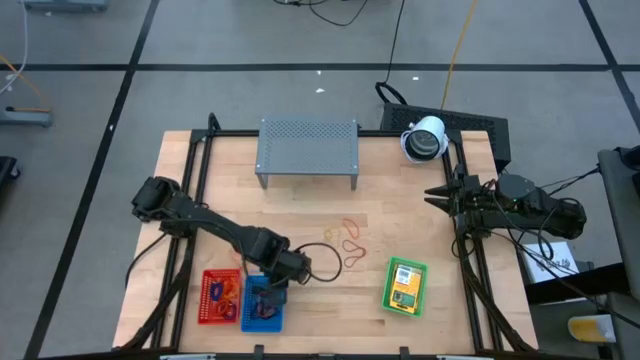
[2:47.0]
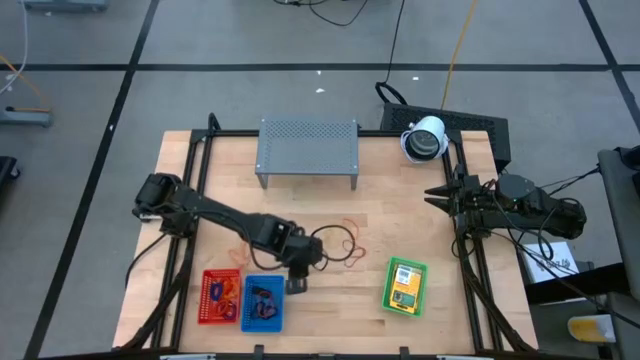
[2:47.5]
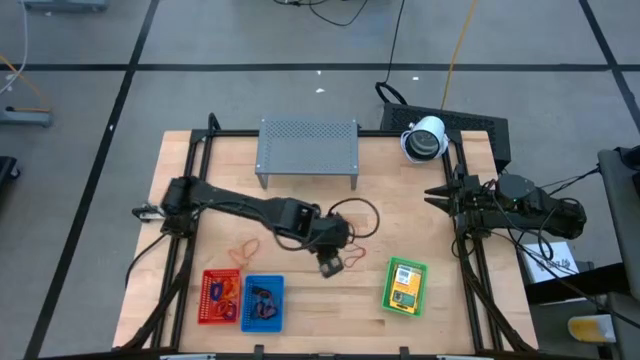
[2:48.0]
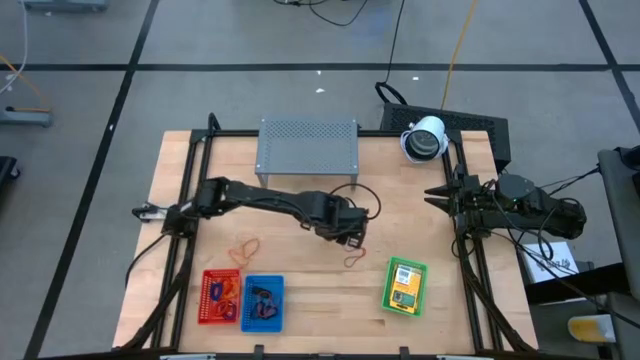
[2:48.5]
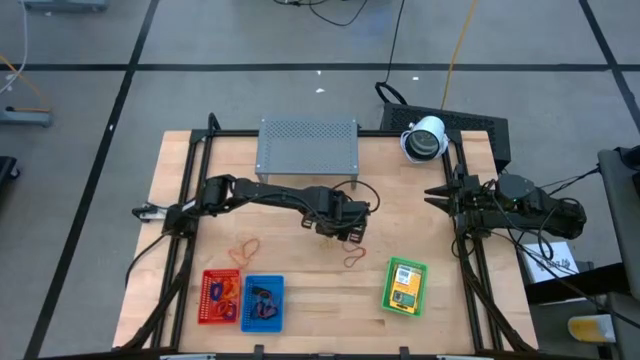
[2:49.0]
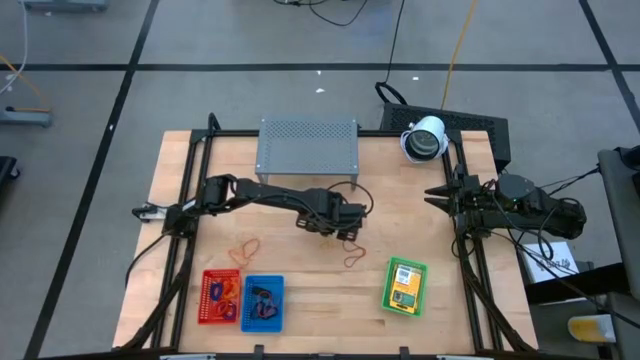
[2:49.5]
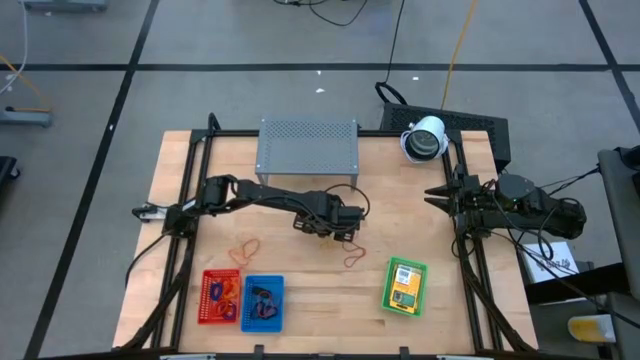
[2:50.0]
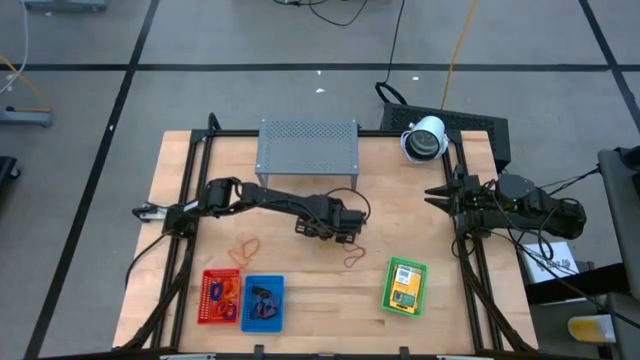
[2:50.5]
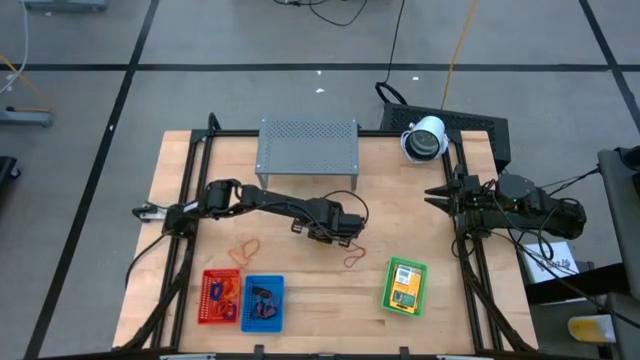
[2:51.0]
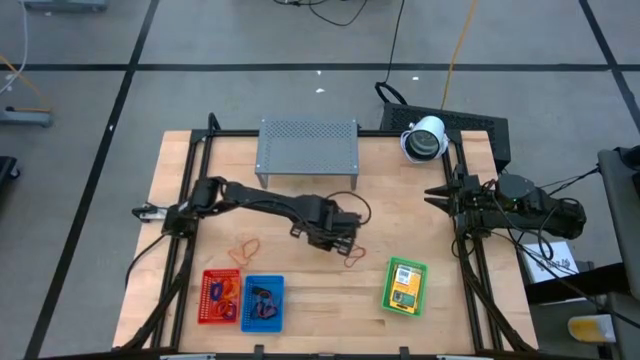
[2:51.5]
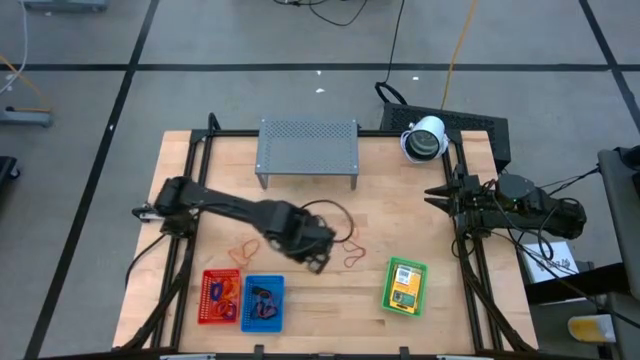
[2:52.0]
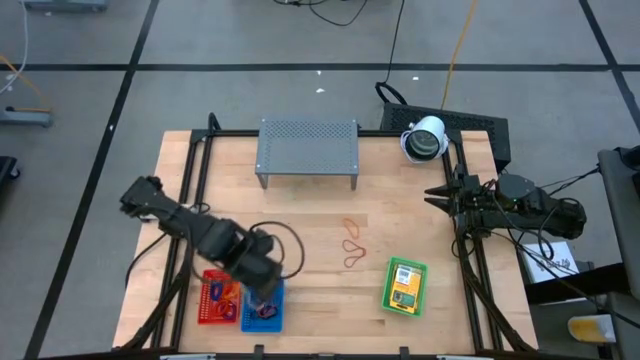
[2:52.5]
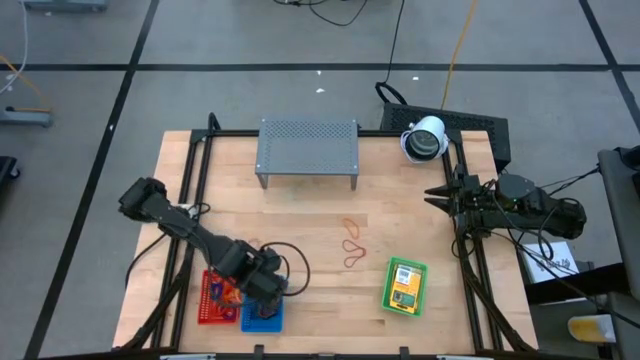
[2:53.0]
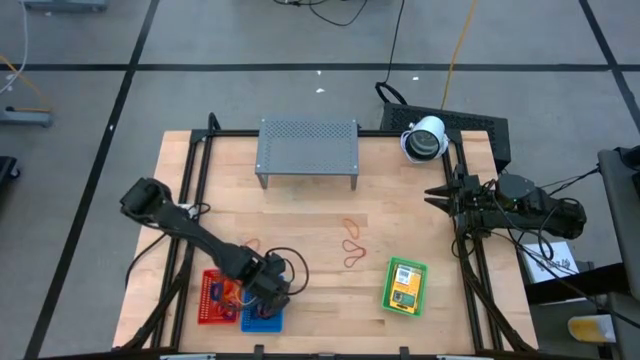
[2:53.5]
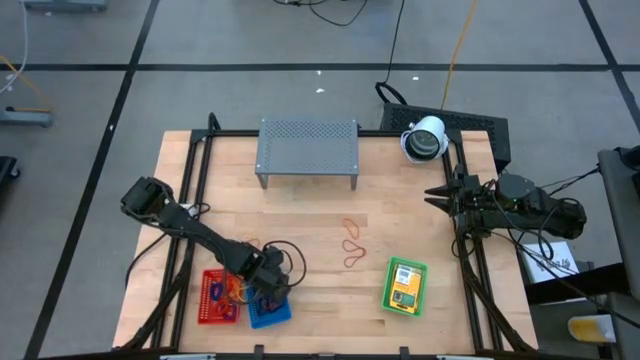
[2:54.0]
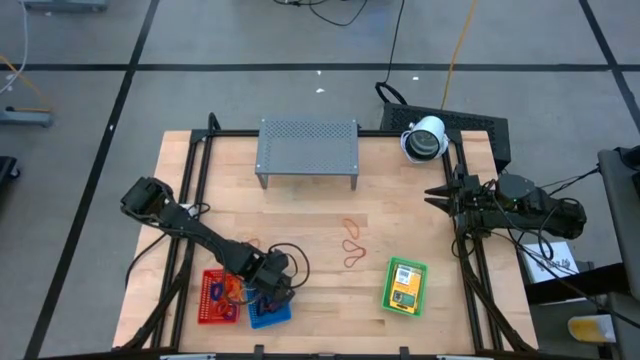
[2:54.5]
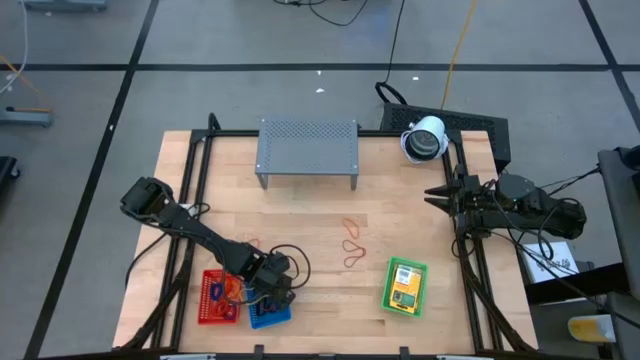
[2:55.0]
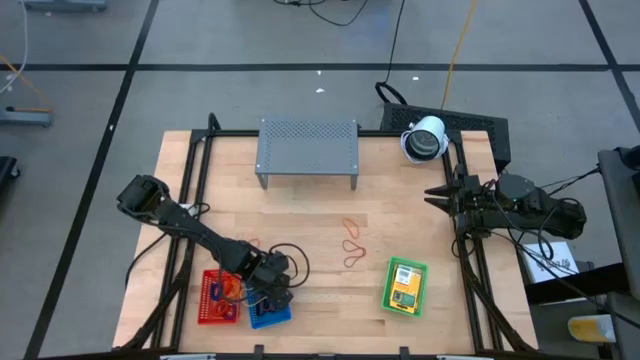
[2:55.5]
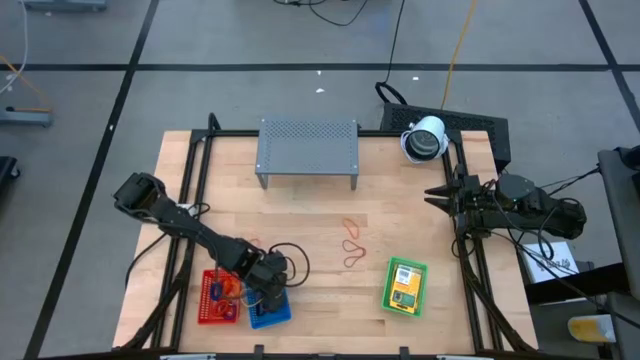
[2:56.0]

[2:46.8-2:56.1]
Task: Pick & Place Office Desk Supplies
Put the yellow rubber band into the blue bin

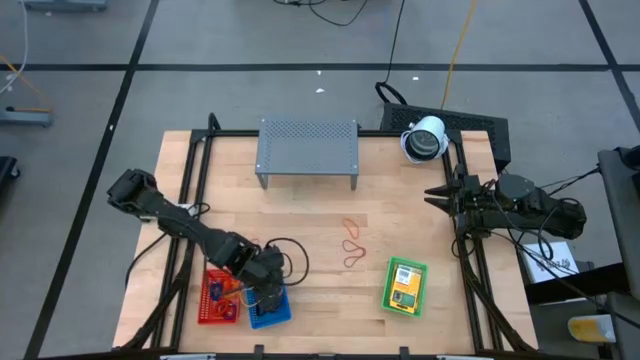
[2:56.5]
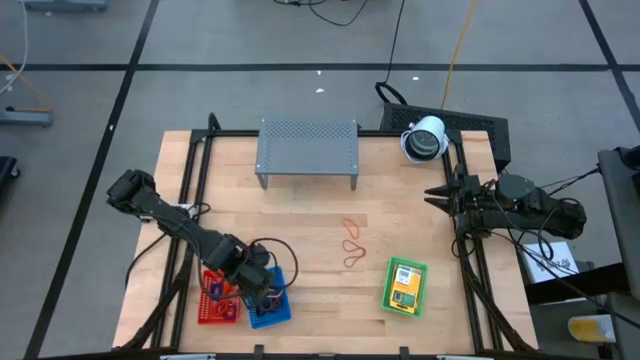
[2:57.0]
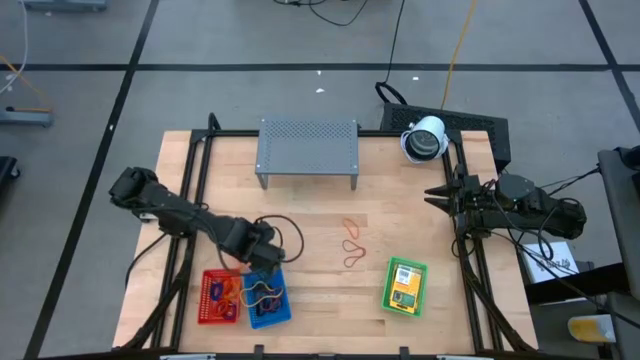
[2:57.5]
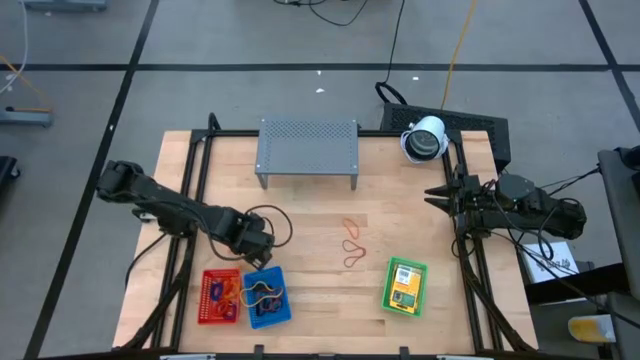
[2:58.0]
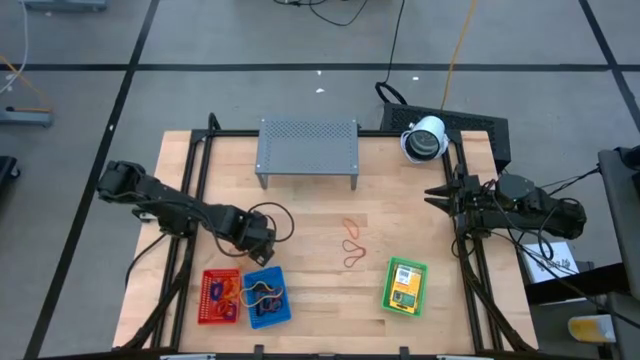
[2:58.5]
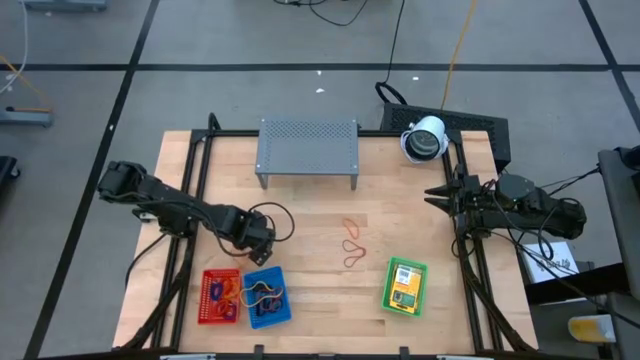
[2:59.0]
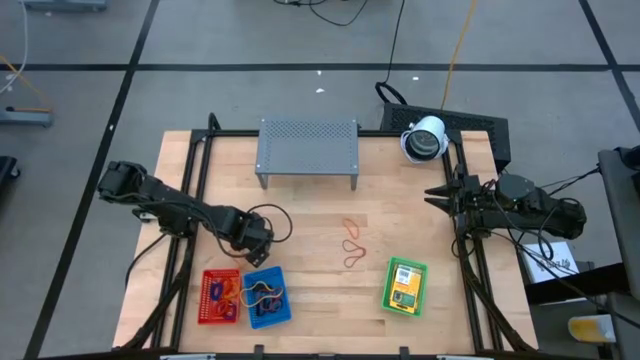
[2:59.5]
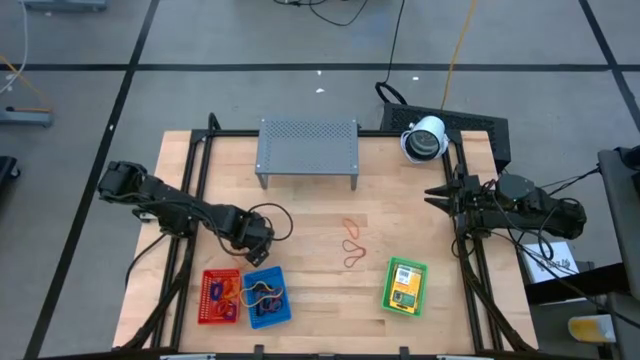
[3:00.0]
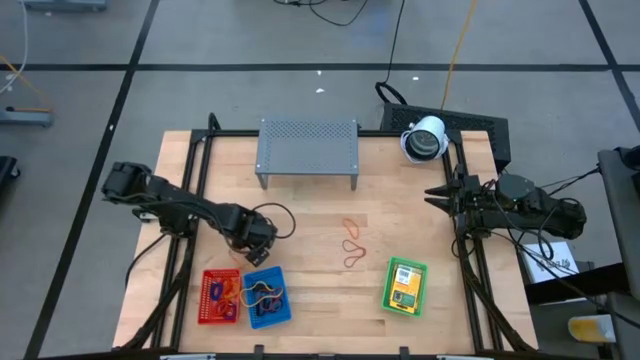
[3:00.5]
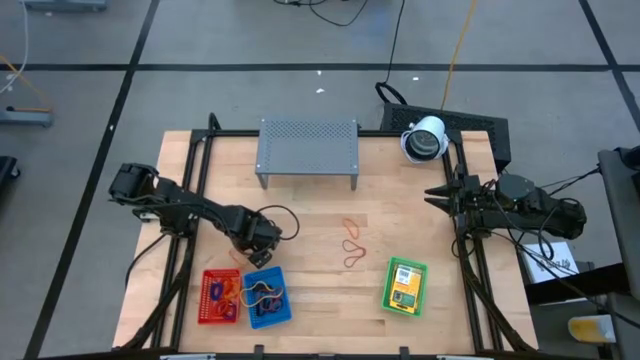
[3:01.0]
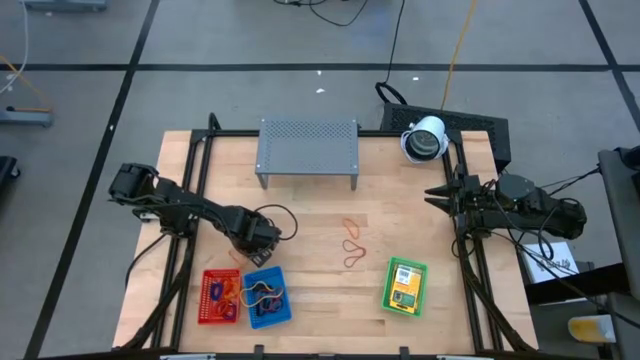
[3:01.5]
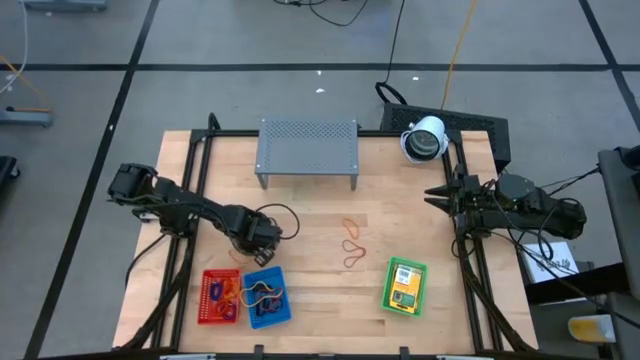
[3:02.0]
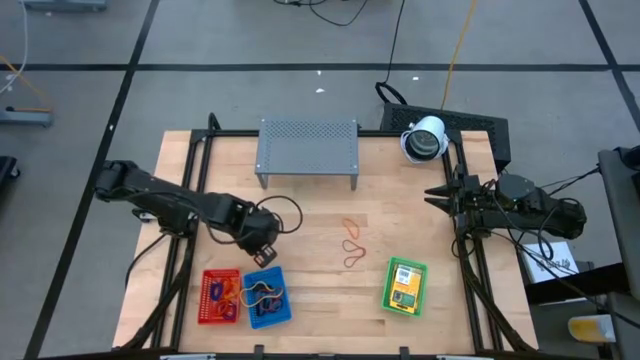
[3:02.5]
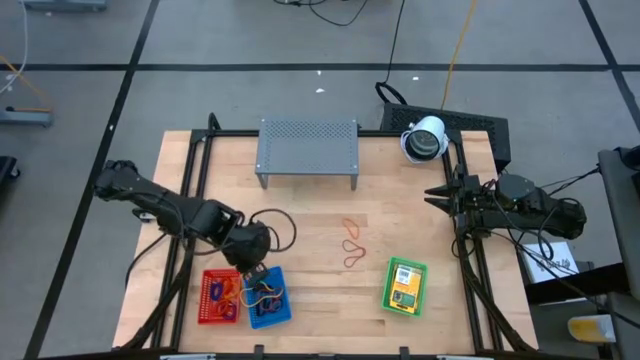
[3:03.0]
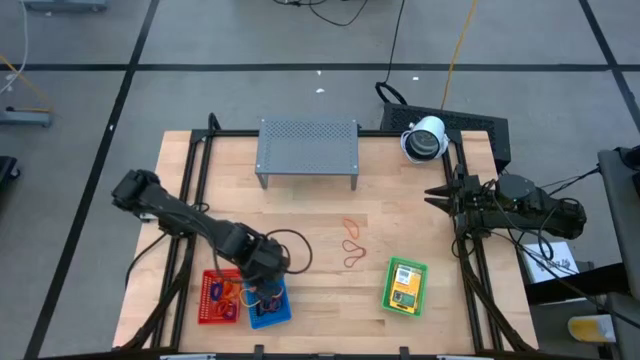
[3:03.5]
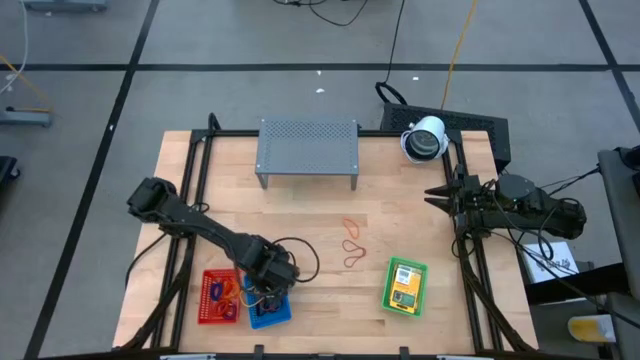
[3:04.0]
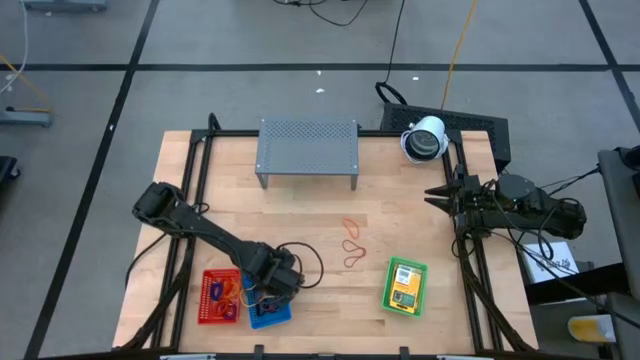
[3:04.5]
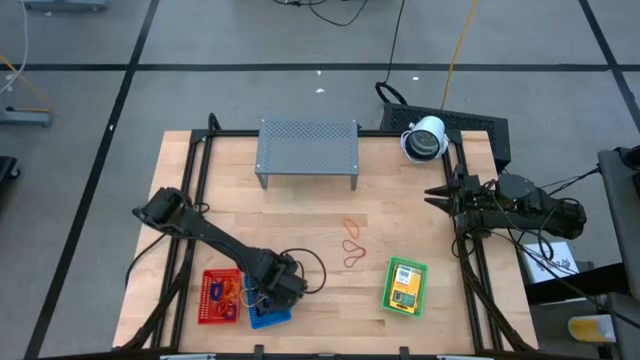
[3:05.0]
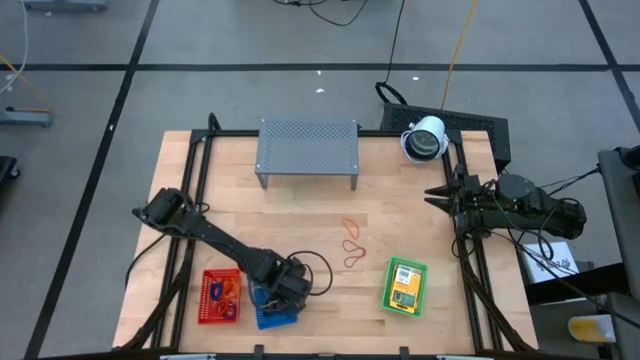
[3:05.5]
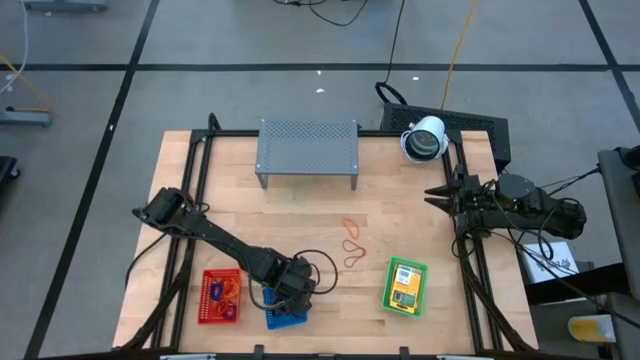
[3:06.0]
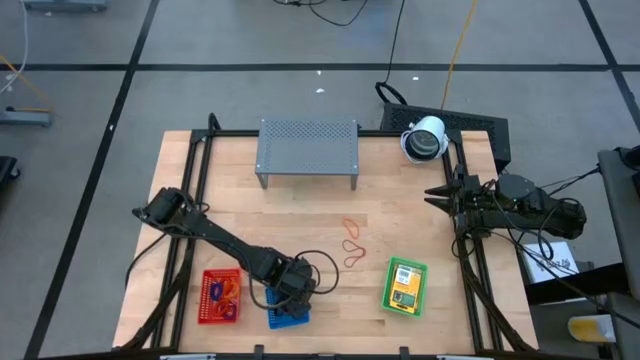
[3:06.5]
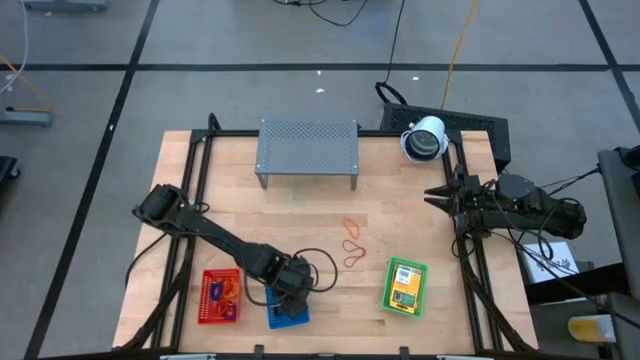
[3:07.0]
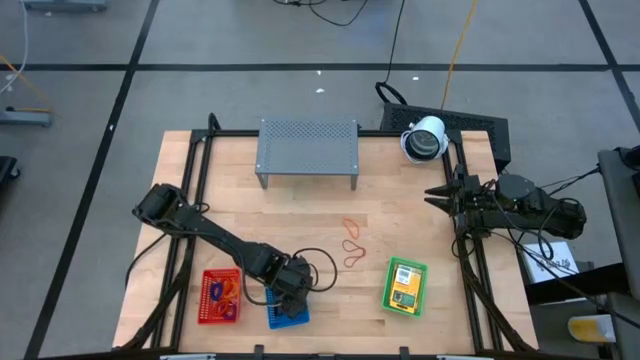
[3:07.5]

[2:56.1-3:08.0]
Put the orange rubber band into the blue bin

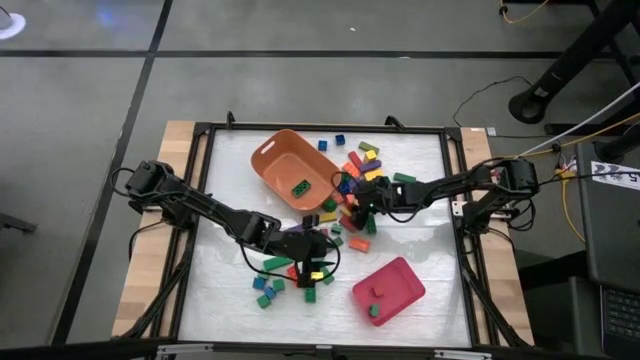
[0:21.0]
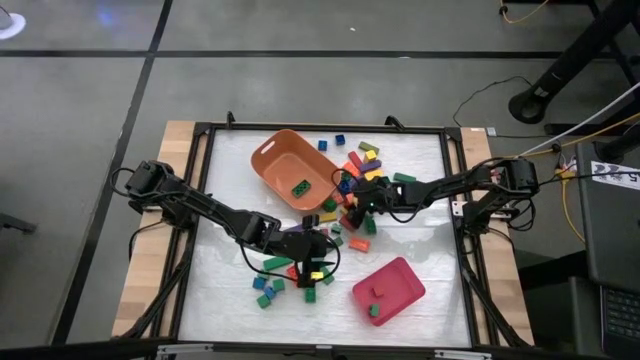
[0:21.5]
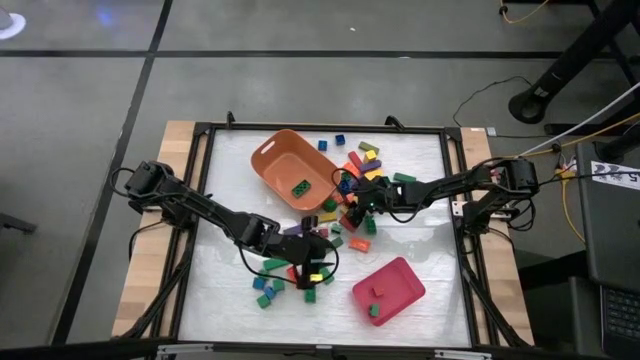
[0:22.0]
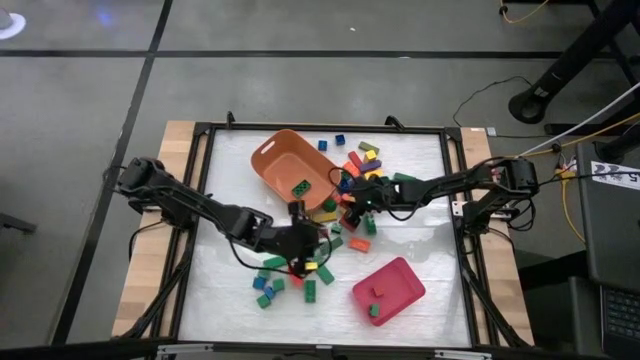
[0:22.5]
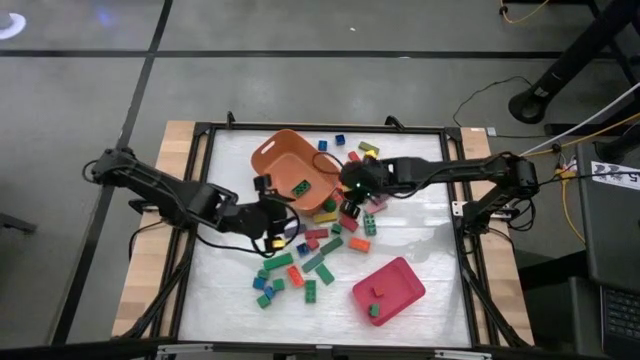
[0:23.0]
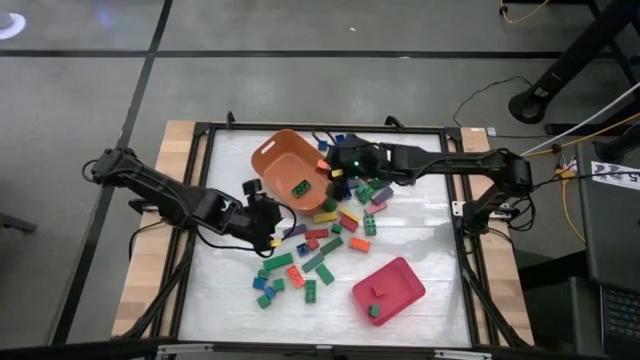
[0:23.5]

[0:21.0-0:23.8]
Task: Sort blocks by size
Put the large orange game piece into the orange bin
